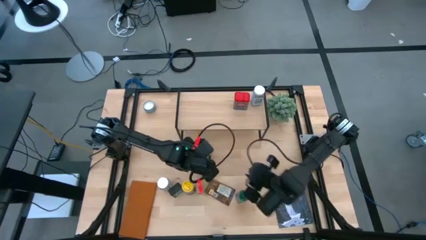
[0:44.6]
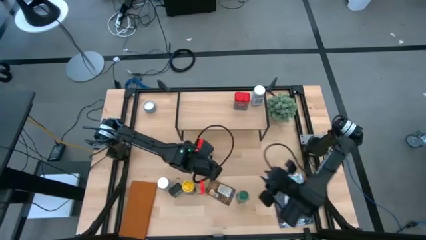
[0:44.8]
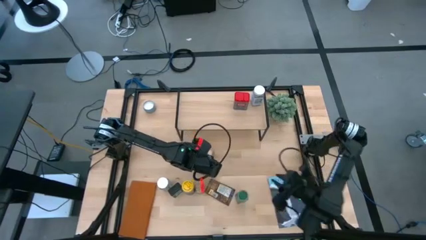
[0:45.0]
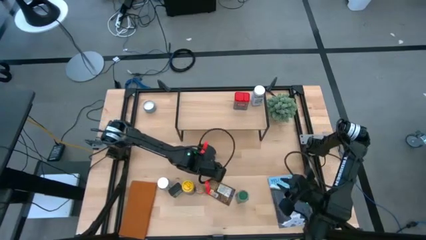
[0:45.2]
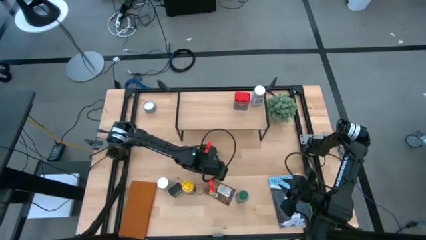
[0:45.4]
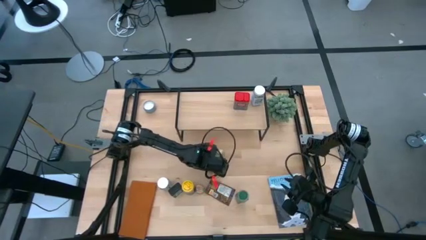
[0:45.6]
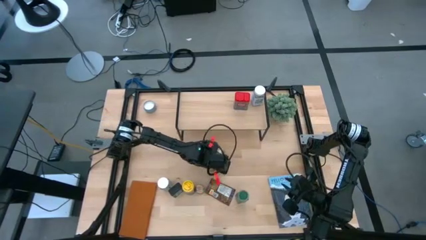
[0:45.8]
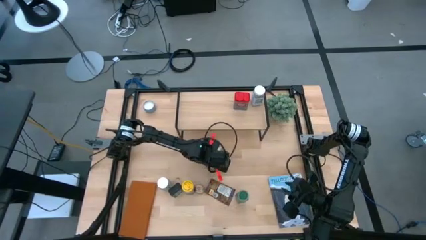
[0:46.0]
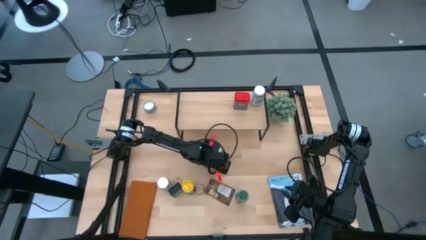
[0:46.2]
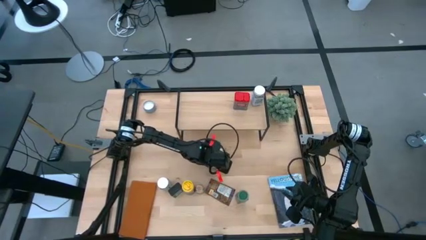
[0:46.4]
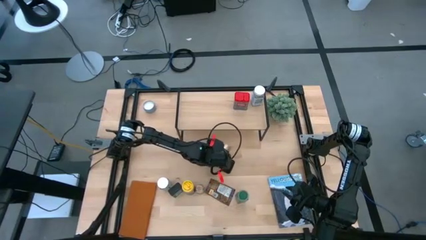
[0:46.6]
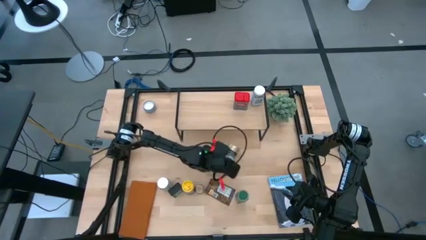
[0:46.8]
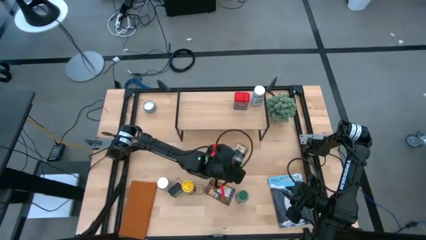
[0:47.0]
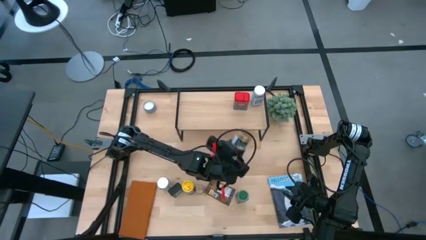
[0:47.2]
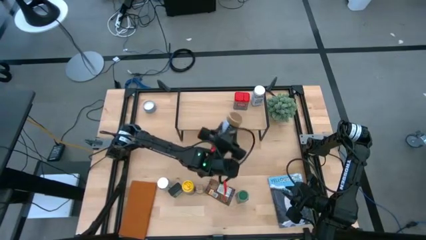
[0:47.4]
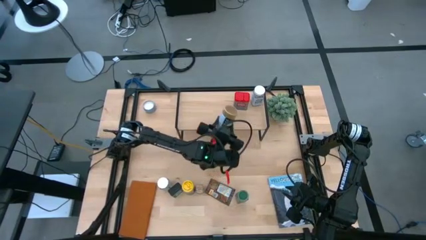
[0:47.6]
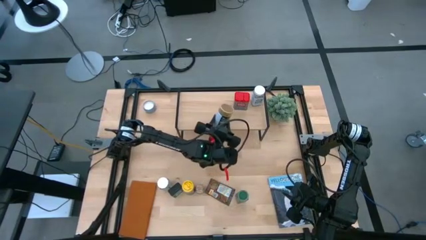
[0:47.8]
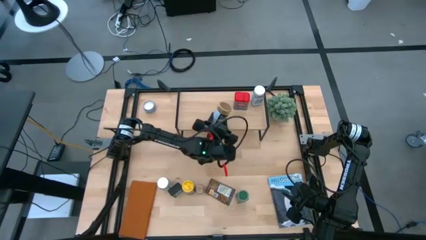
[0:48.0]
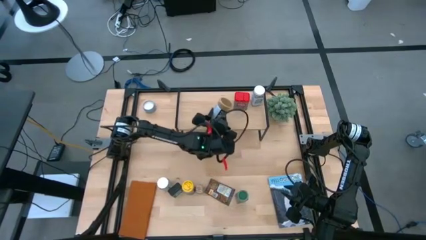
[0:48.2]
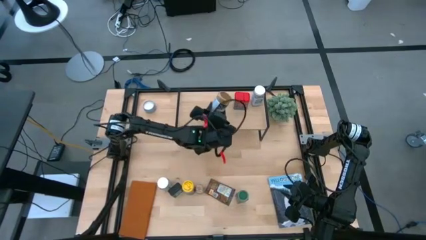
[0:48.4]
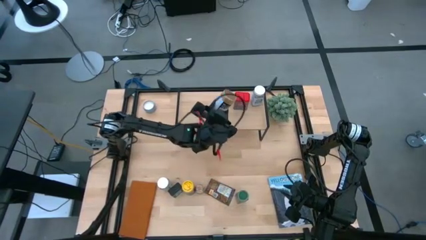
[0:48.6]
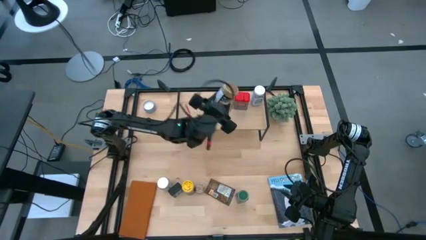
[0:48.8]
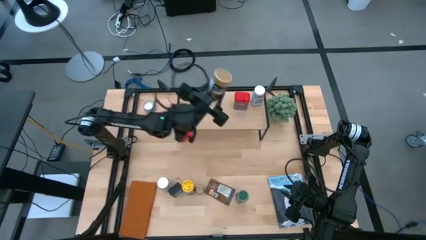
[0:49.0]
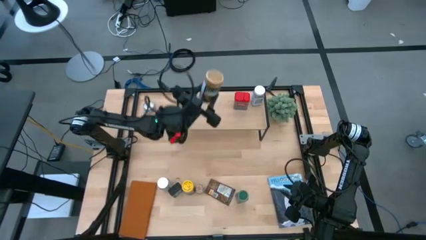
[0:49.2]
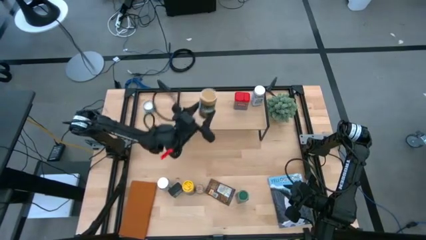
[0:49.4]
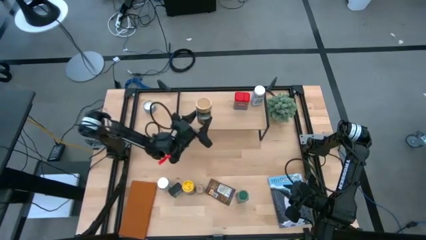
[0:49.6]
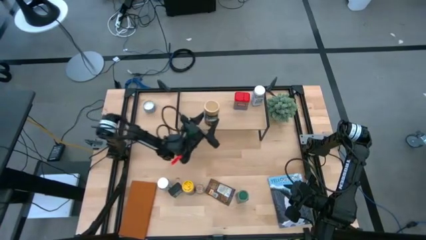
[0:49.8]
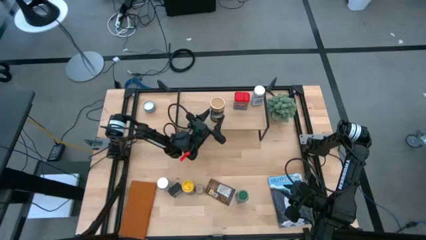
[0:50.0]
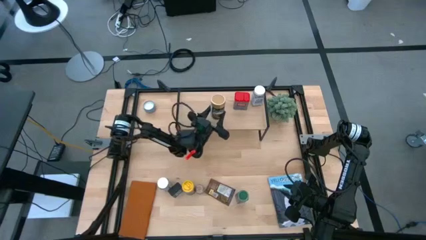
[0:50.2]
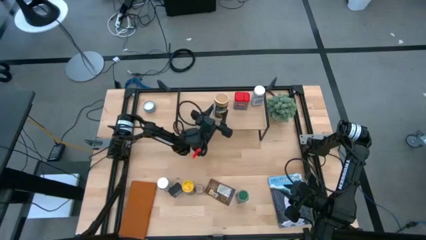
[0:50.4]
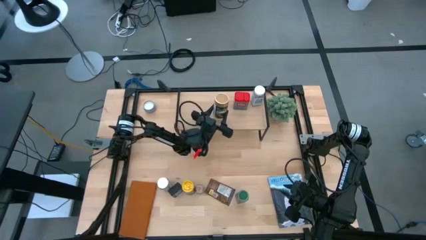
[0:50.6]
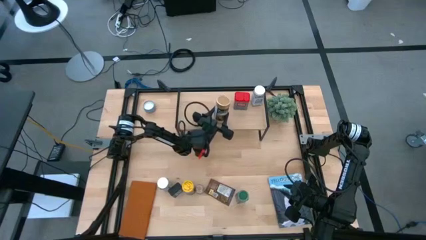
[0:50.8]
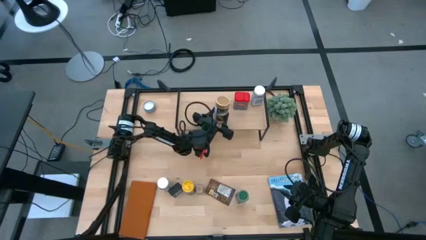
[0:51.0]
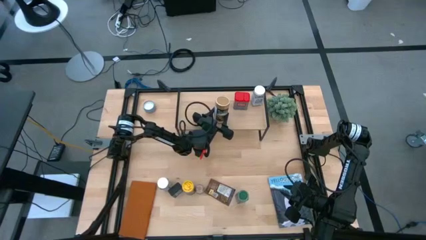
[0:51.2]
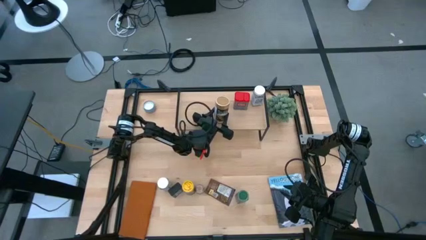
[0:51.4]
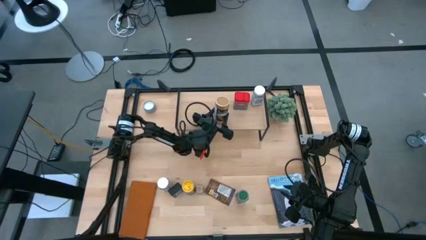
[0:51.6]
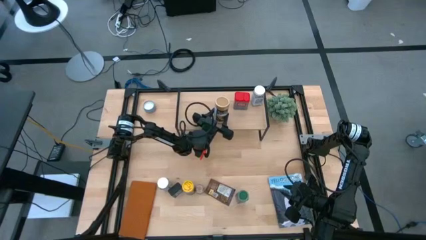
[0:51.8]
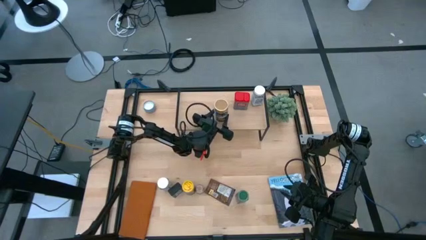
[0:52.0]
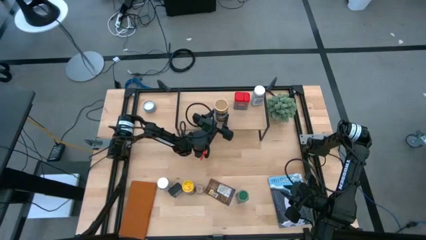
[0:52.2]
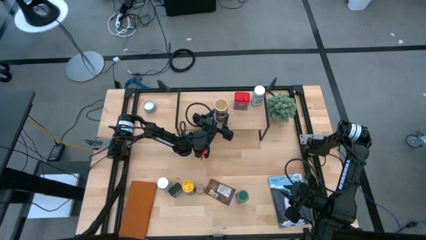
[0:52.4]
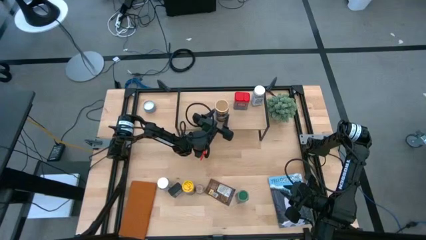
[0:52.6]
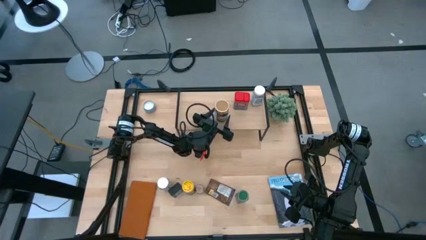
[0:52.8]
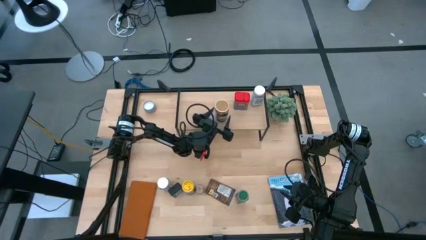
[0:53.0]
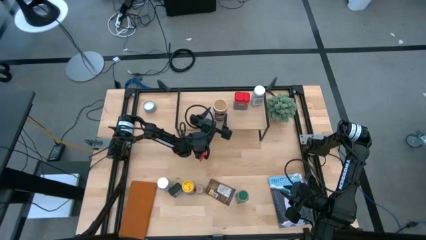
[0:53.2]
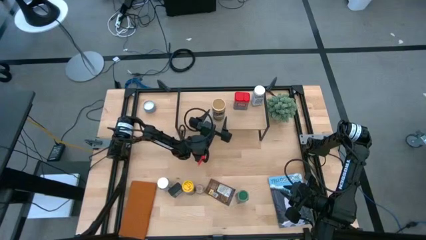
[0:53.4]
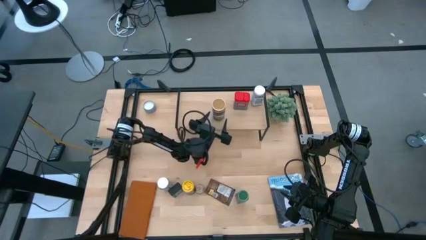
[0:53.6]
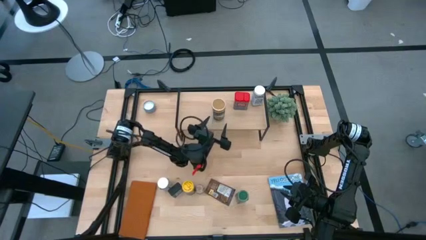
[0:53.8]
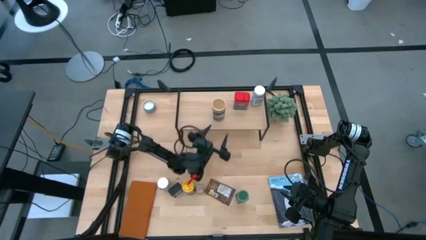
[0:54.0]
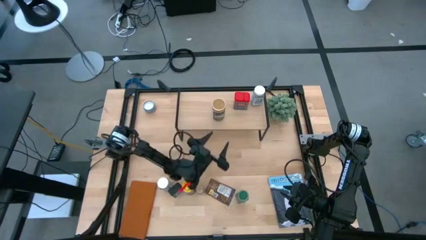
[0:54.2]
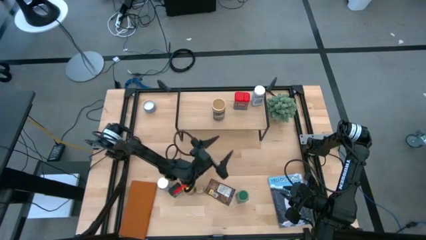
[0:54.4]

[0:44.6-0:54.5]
Task: Shelf spices
Put the brown seasoning bottle on the shelf
